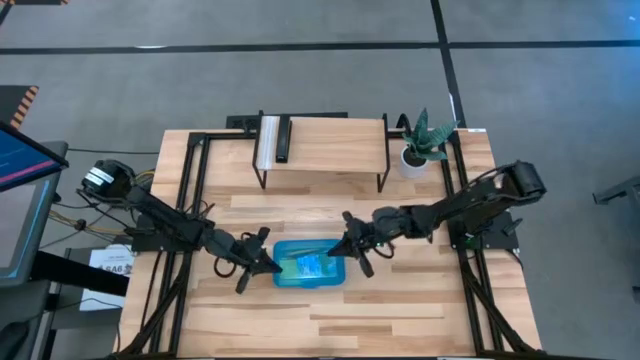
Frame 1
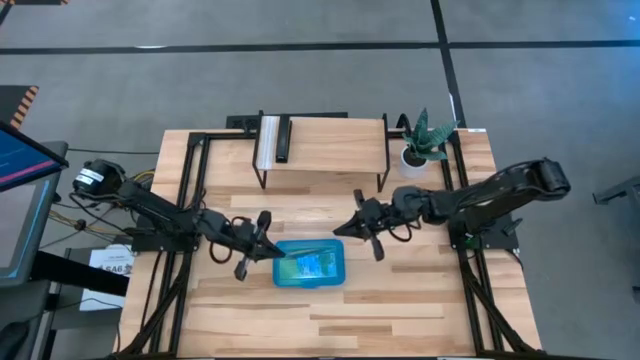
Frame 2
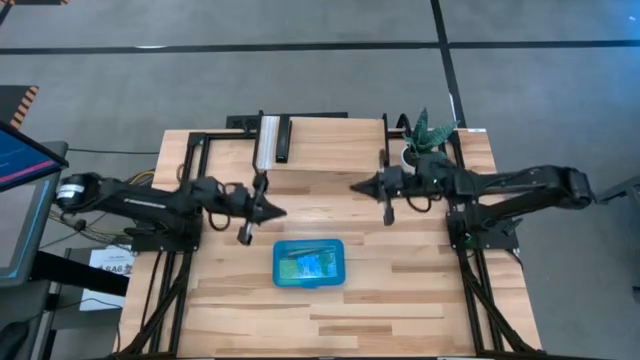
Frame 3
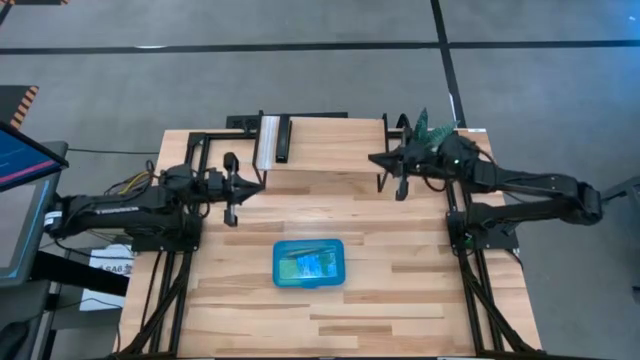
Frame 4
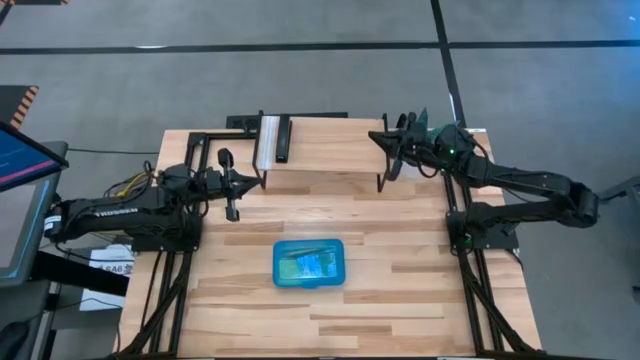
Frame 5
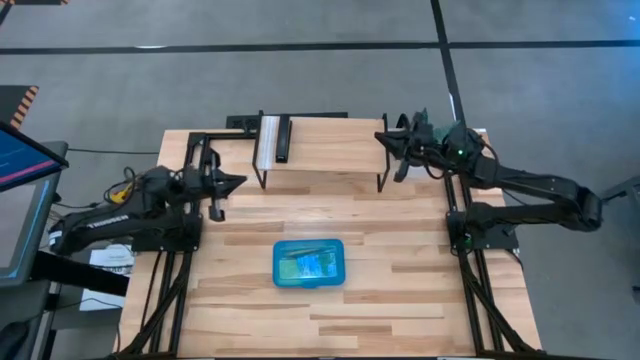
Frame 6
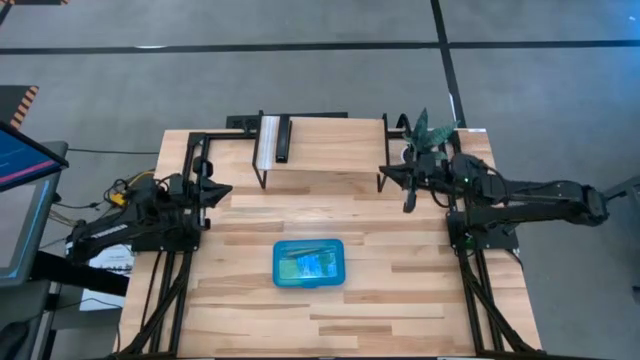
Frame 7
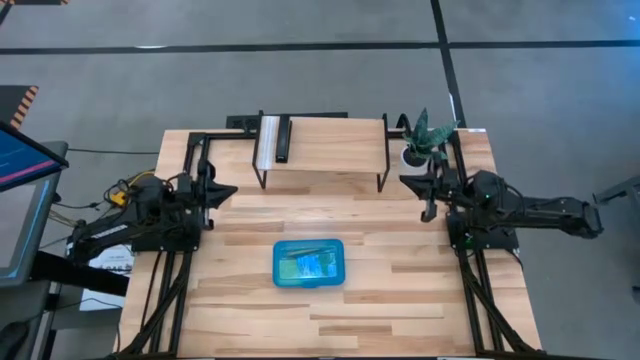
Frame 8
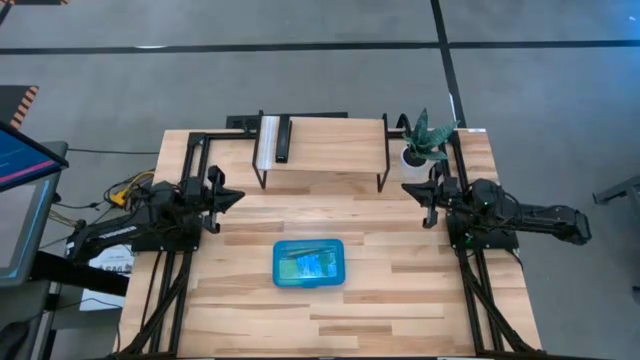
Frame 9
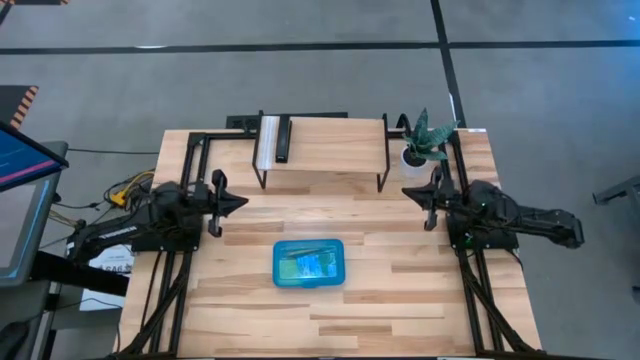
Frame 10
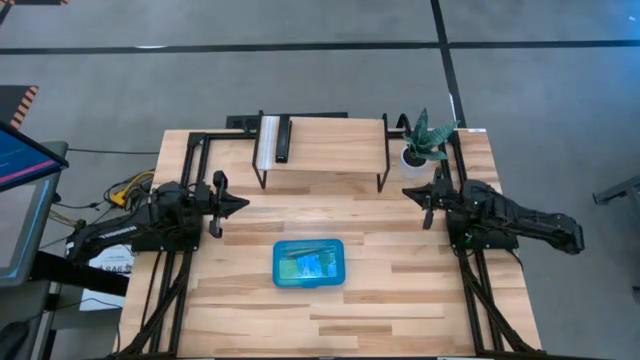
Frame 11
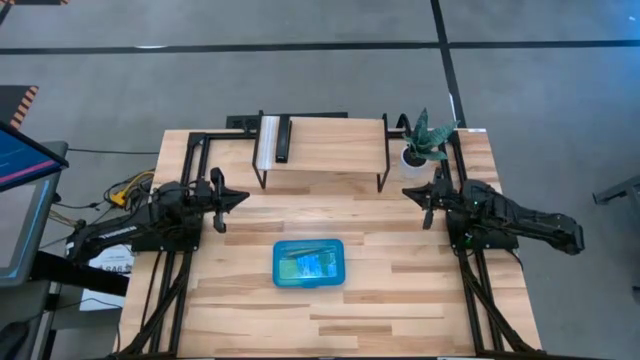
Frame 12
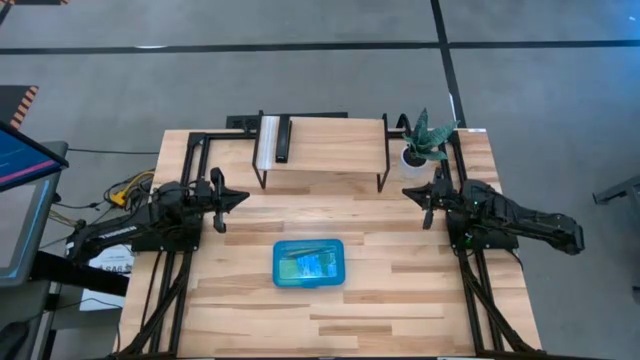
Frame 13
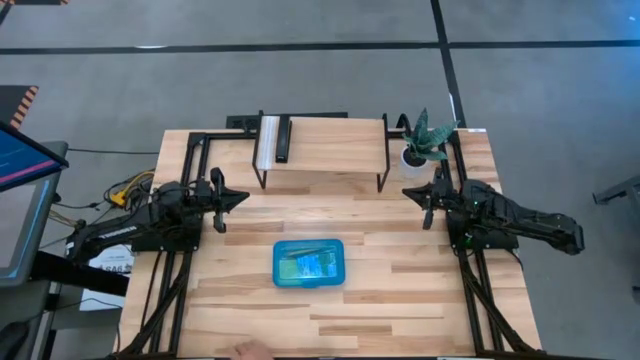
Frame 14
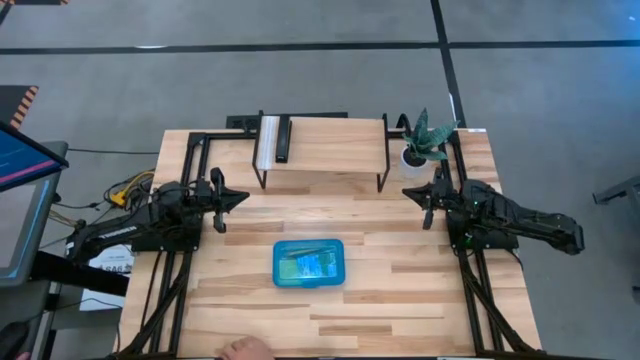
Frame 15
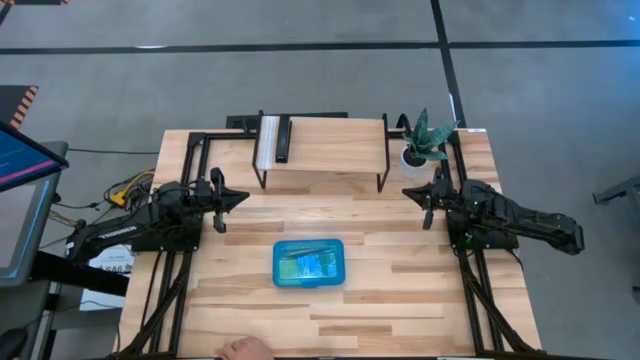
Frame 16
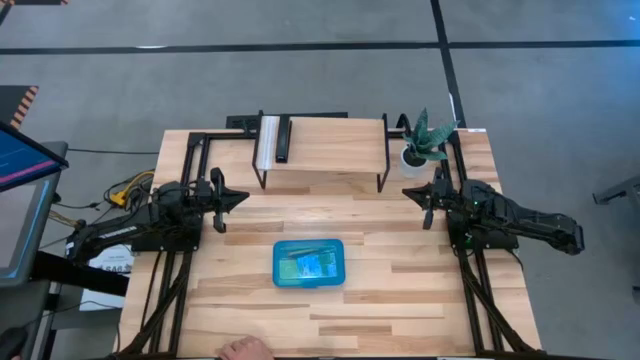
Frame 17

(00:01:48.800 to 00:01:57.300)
Task: Pack school essentials
Return to Home Position

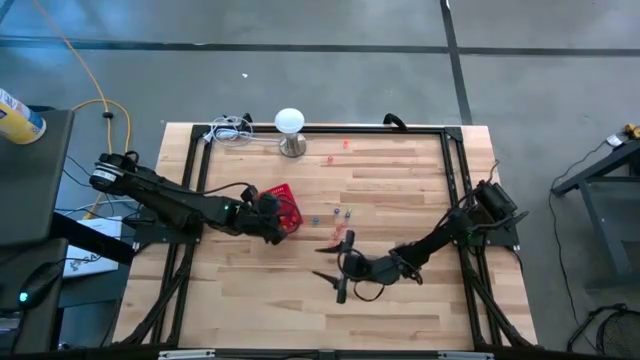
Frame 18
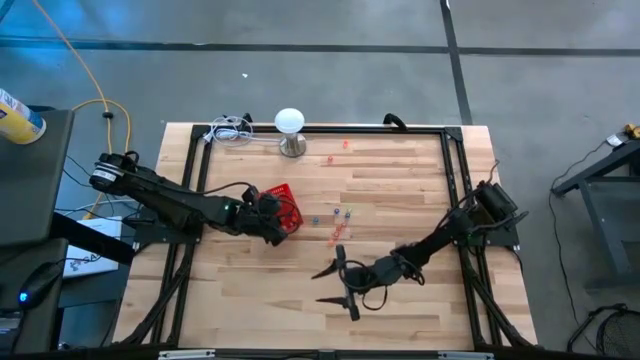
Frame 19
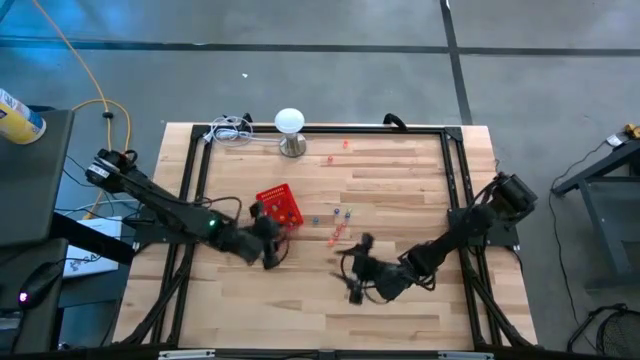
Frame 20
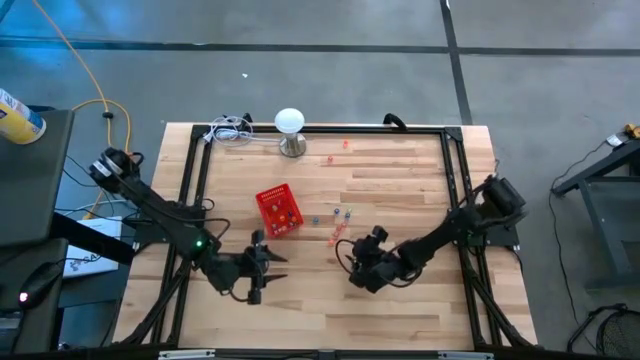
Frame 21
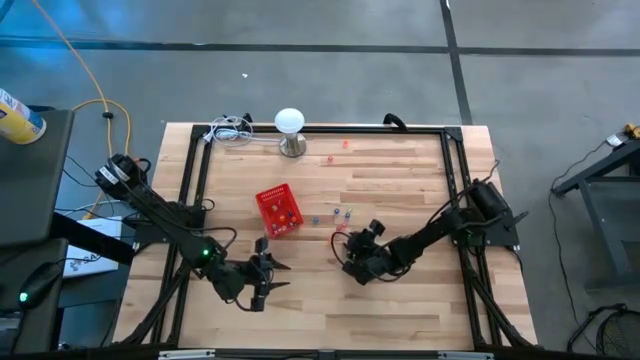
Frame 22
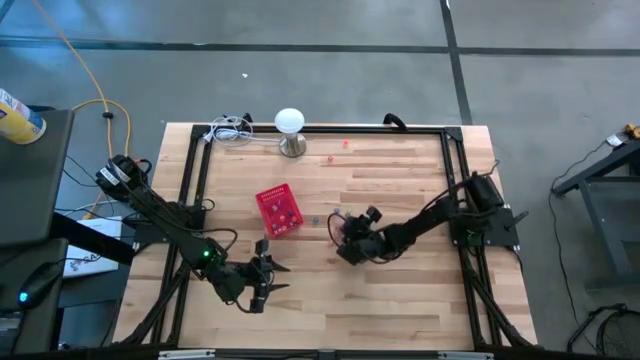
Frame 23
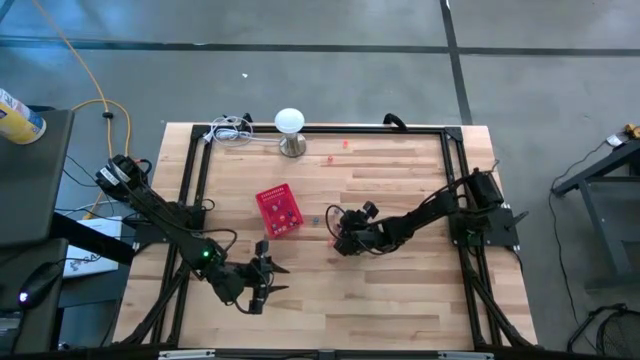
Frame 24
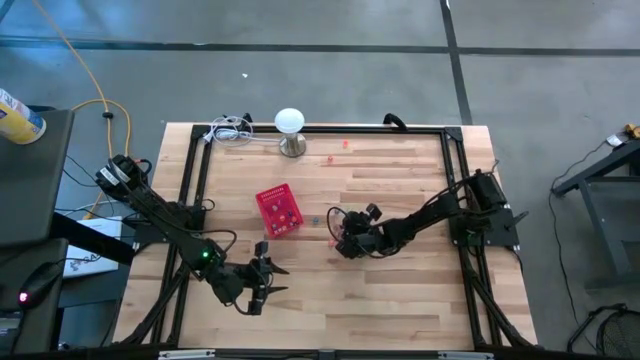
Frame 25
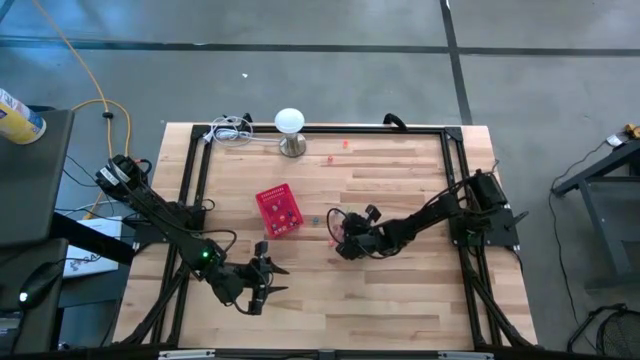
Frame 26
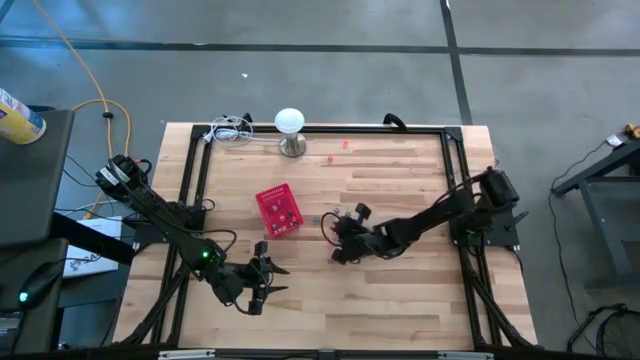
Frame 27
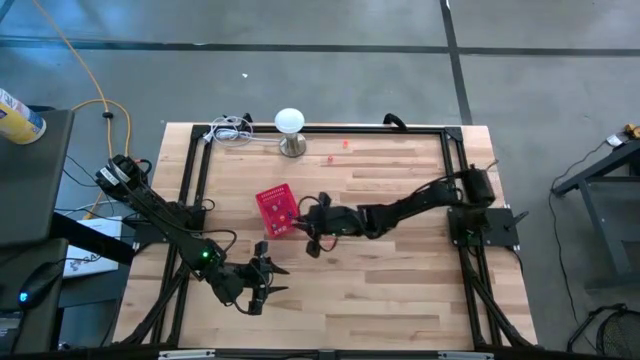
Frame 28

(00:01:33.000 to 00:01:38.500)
Task: Pick & Place Dice
Put the pink die into the red basket

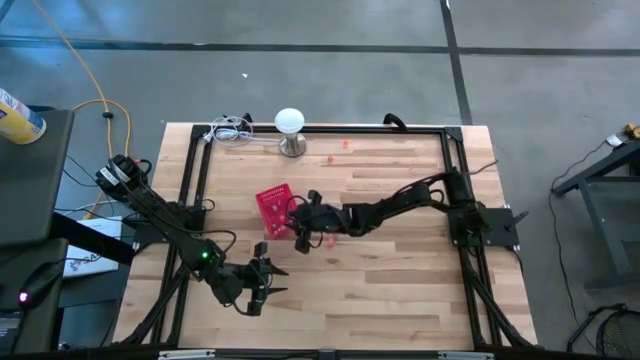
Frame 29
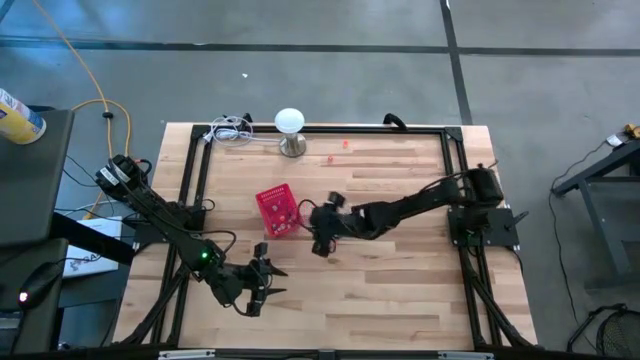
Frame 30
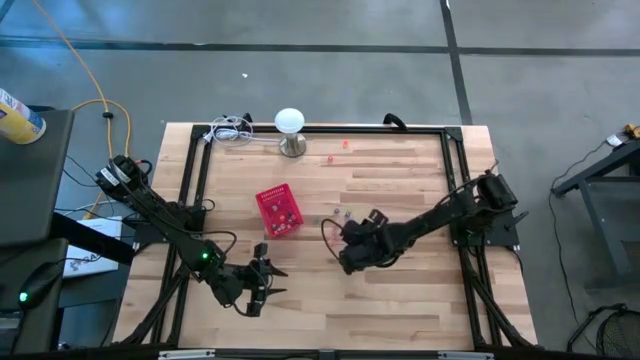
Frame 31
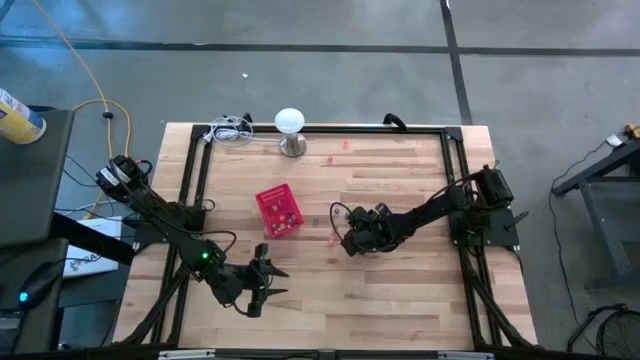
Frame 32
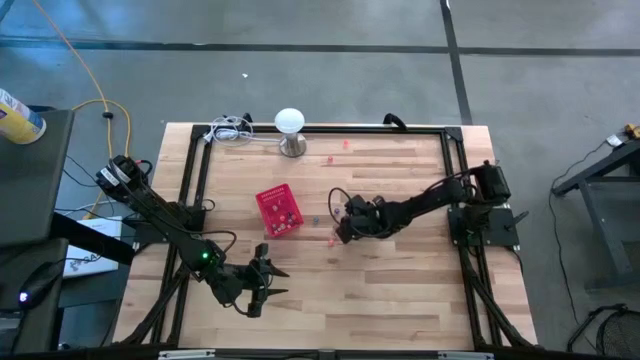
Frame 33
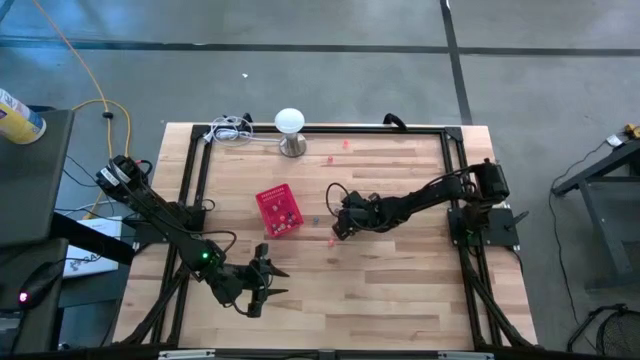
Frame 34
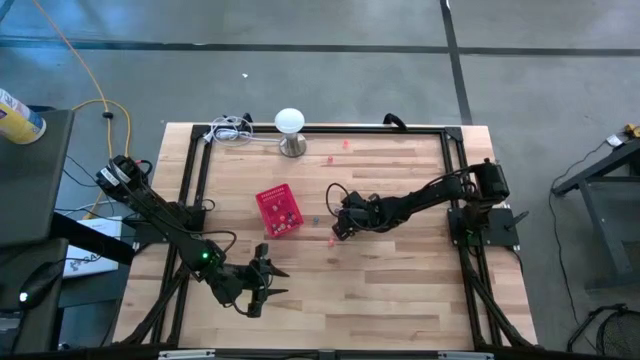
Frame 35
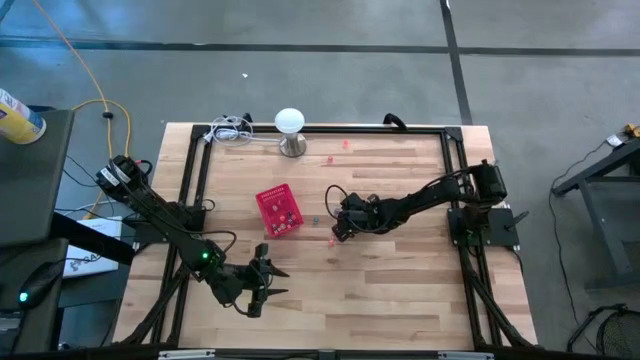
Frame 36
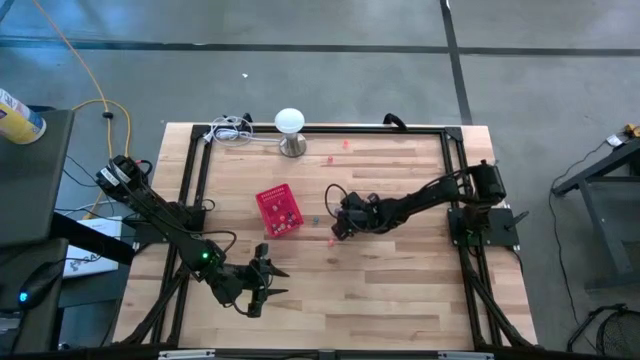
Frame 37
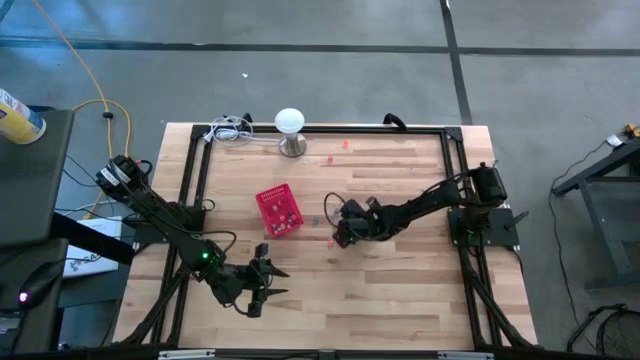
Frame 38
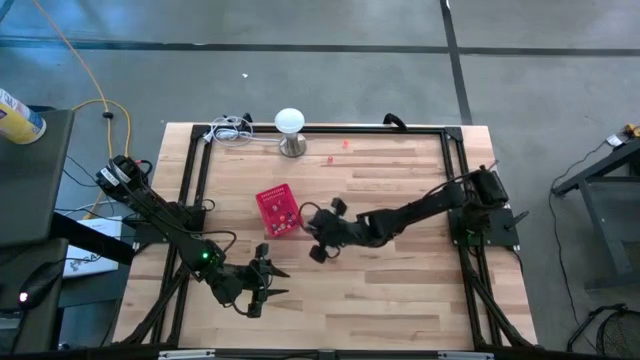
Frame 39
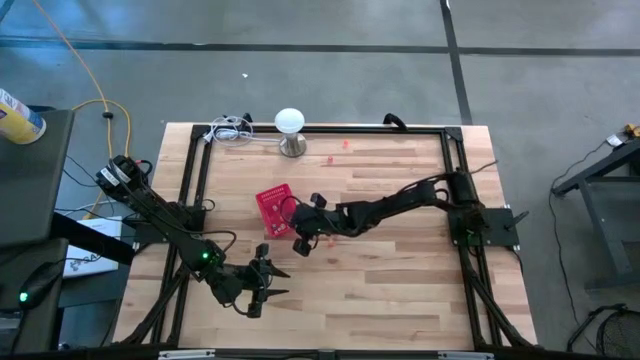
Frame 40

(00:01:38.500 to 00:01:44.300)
Put the dark blue die into the red basket
